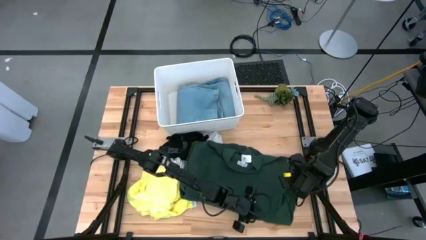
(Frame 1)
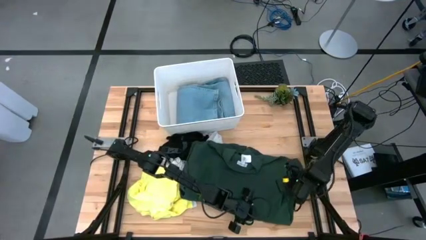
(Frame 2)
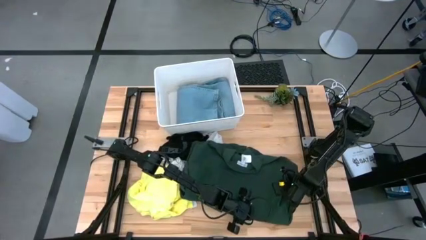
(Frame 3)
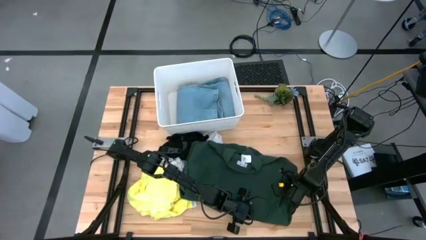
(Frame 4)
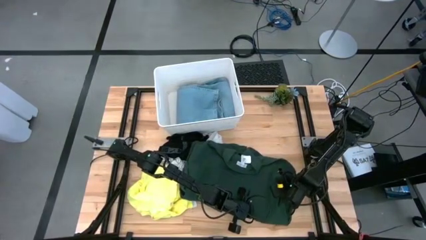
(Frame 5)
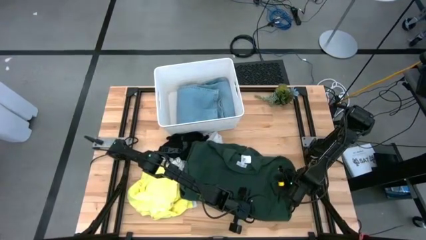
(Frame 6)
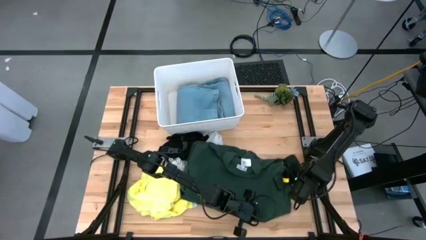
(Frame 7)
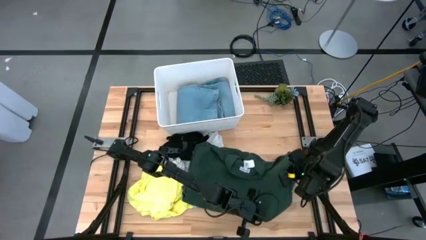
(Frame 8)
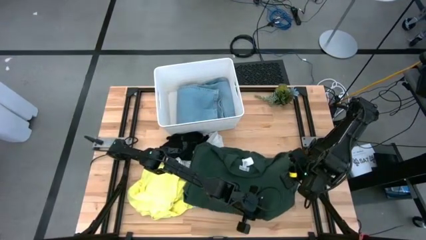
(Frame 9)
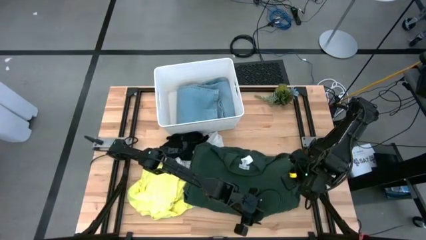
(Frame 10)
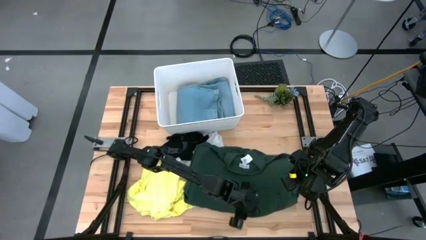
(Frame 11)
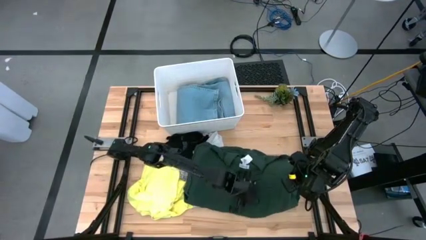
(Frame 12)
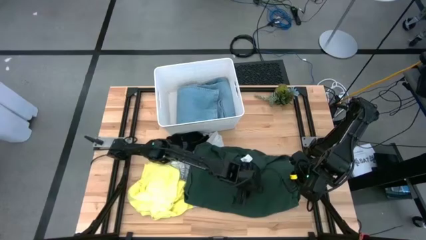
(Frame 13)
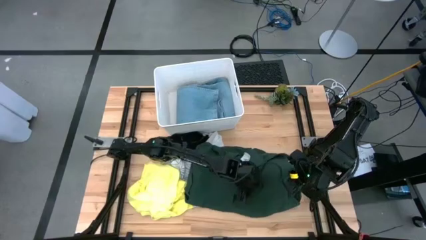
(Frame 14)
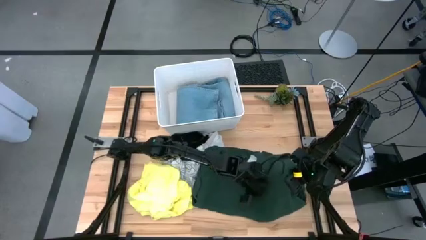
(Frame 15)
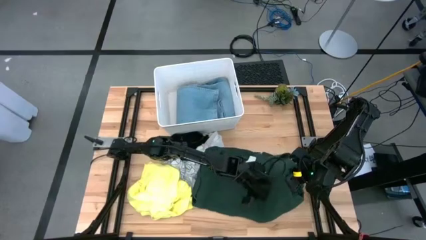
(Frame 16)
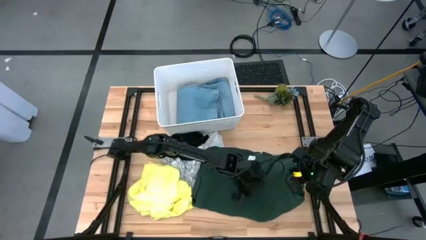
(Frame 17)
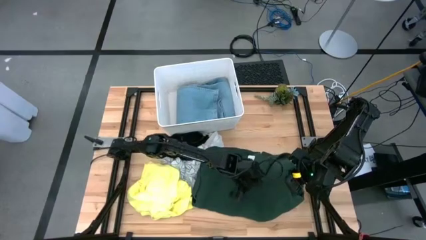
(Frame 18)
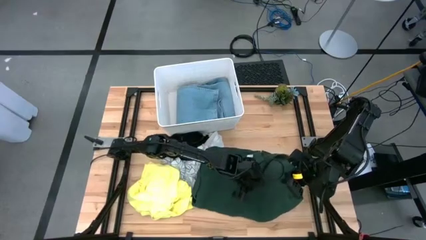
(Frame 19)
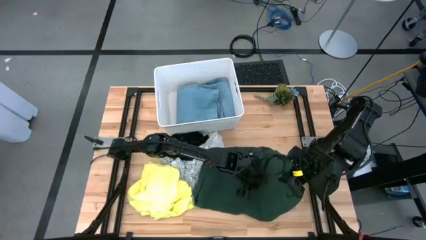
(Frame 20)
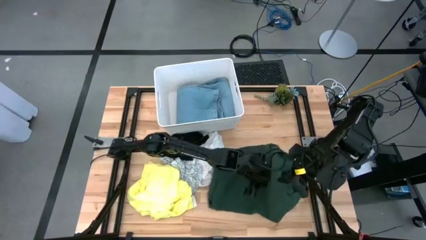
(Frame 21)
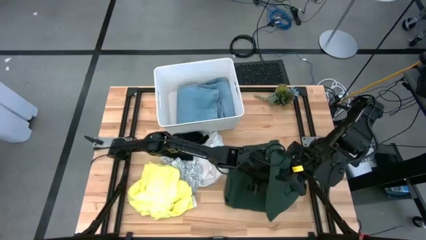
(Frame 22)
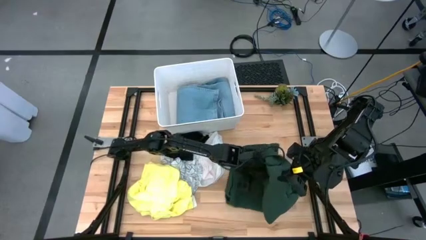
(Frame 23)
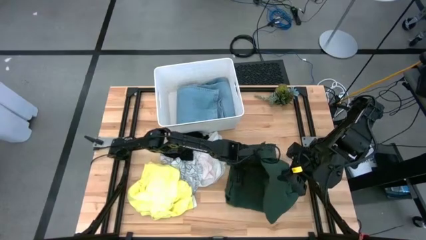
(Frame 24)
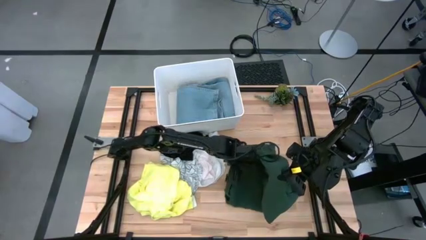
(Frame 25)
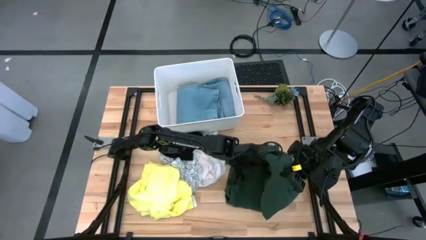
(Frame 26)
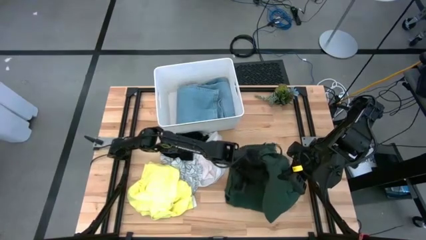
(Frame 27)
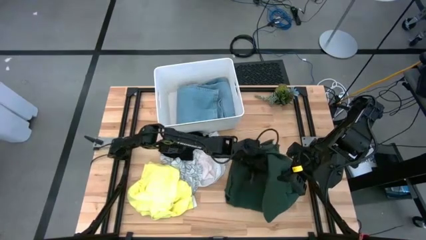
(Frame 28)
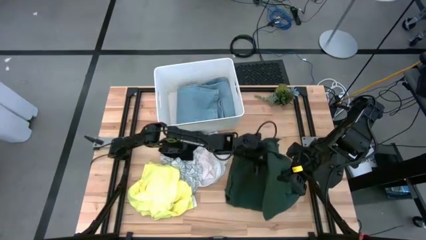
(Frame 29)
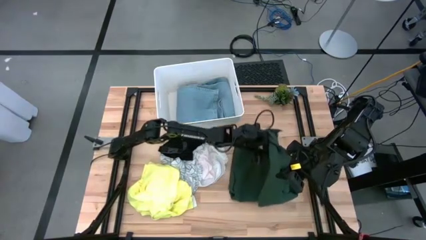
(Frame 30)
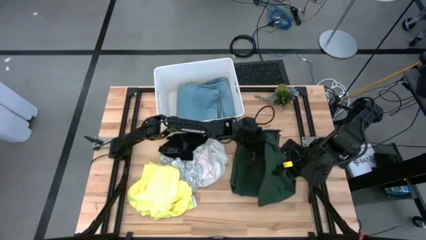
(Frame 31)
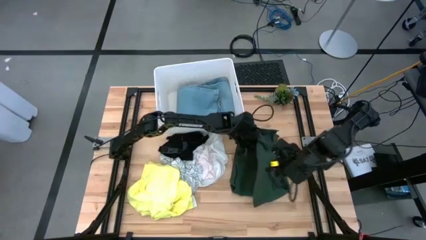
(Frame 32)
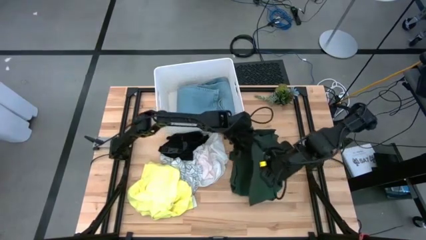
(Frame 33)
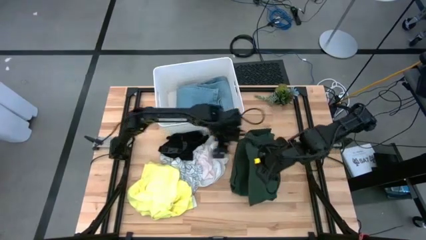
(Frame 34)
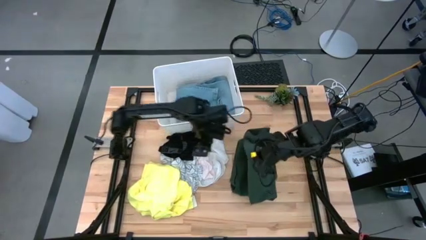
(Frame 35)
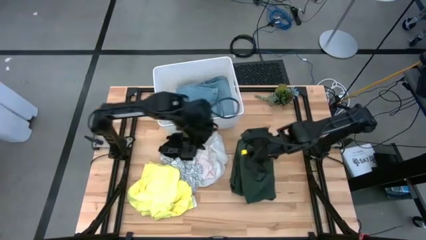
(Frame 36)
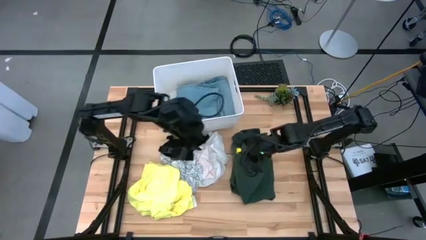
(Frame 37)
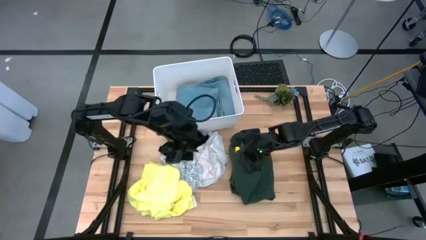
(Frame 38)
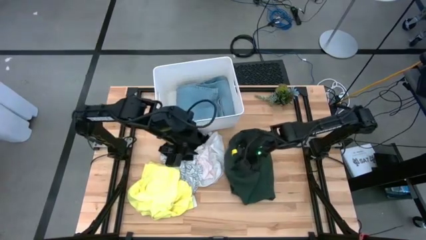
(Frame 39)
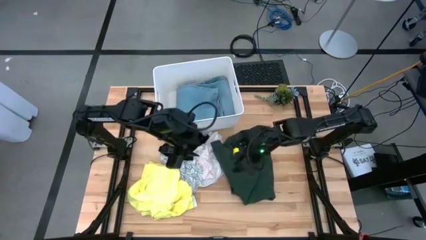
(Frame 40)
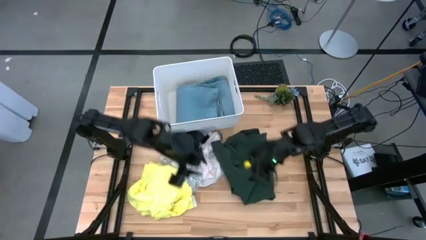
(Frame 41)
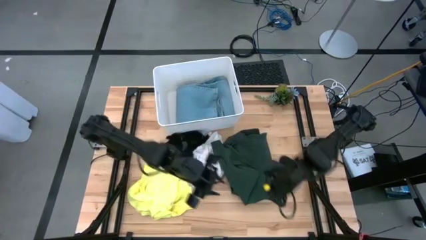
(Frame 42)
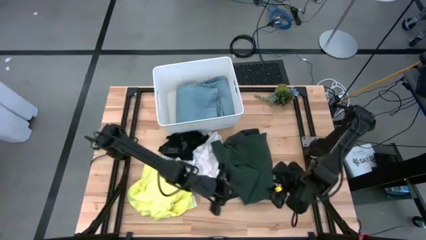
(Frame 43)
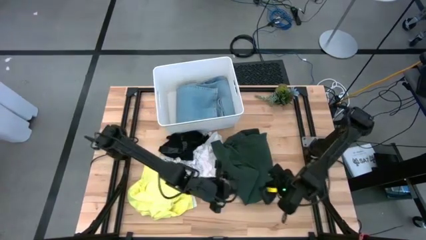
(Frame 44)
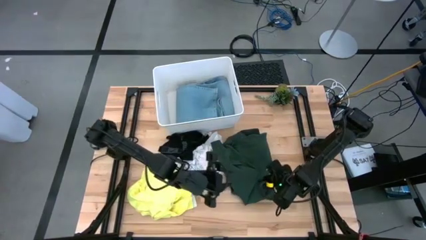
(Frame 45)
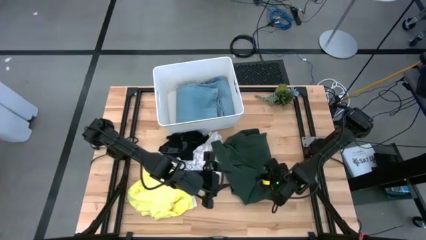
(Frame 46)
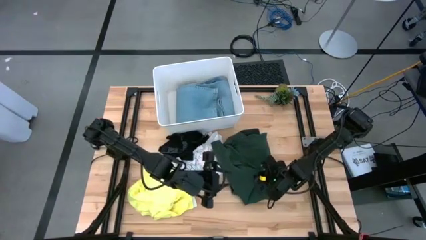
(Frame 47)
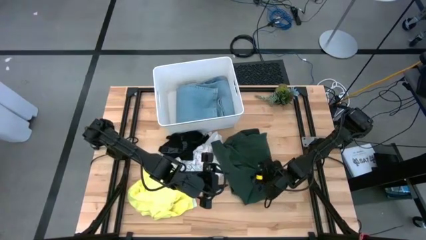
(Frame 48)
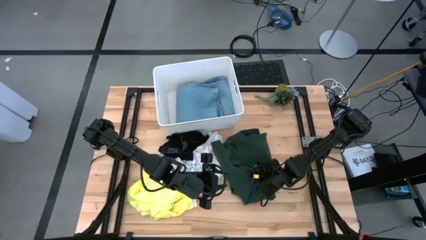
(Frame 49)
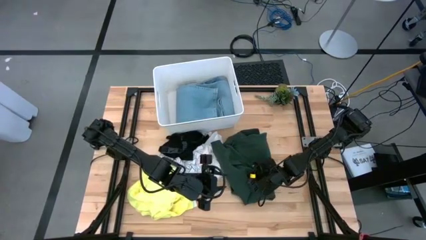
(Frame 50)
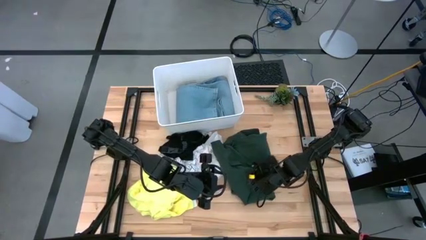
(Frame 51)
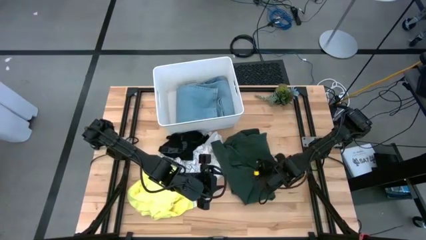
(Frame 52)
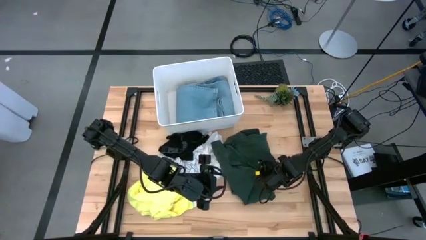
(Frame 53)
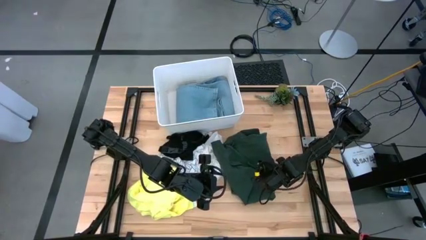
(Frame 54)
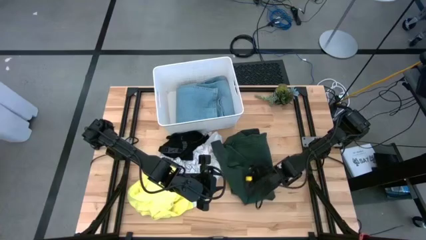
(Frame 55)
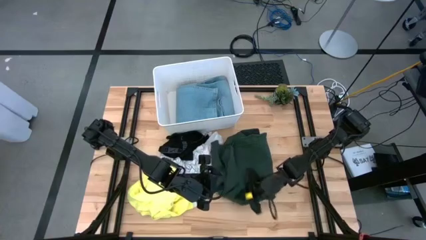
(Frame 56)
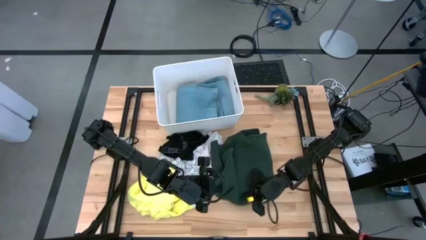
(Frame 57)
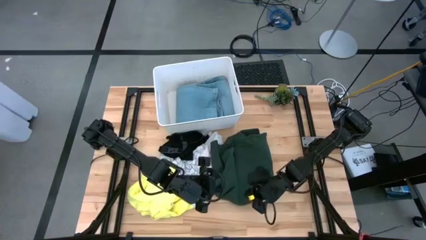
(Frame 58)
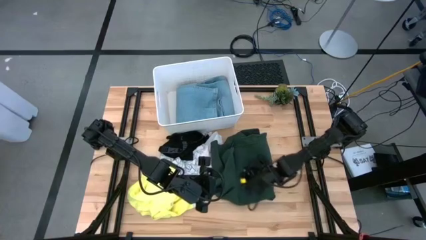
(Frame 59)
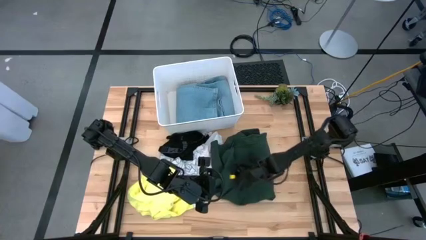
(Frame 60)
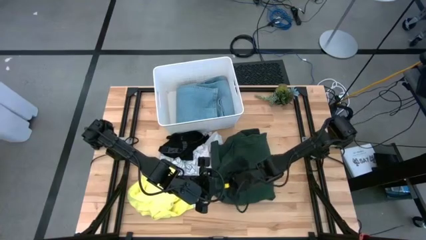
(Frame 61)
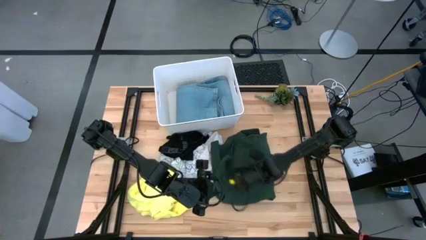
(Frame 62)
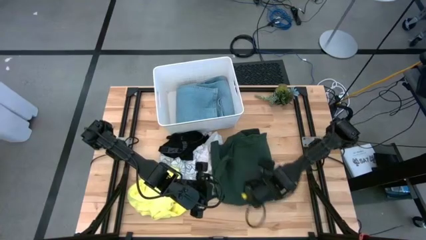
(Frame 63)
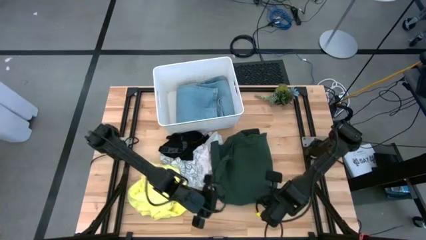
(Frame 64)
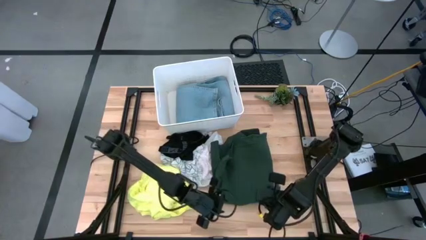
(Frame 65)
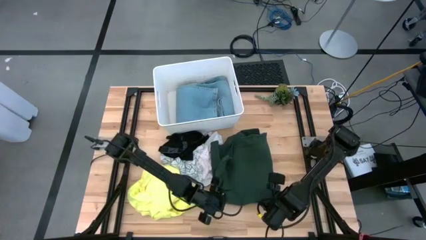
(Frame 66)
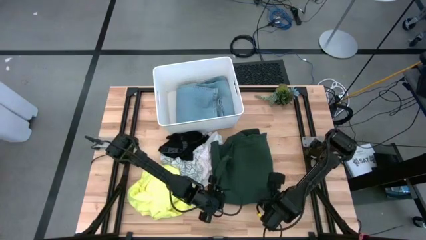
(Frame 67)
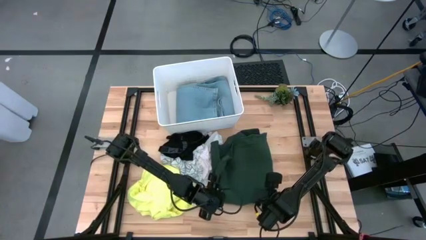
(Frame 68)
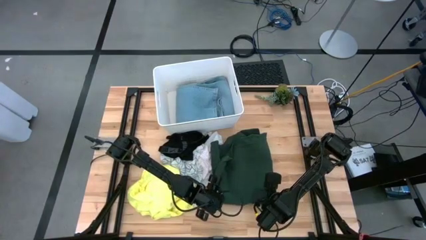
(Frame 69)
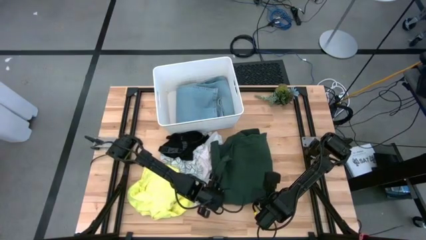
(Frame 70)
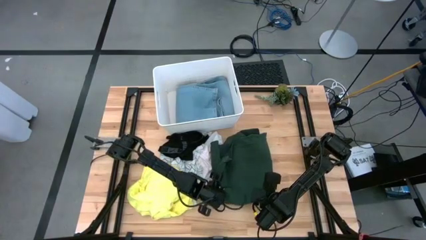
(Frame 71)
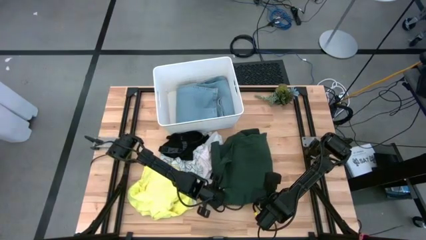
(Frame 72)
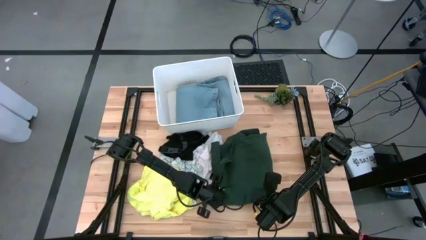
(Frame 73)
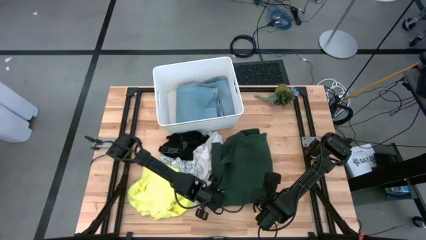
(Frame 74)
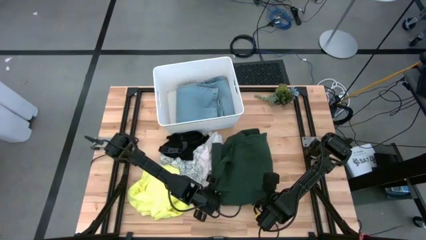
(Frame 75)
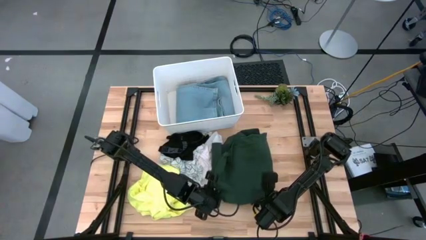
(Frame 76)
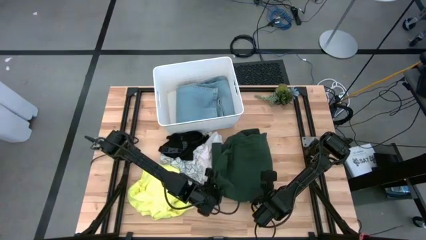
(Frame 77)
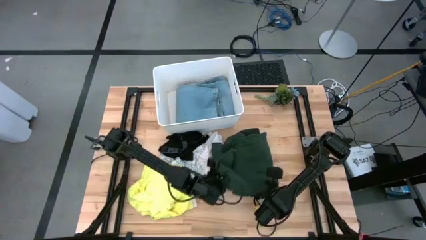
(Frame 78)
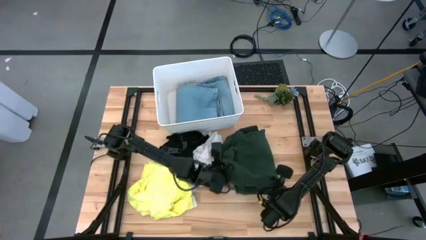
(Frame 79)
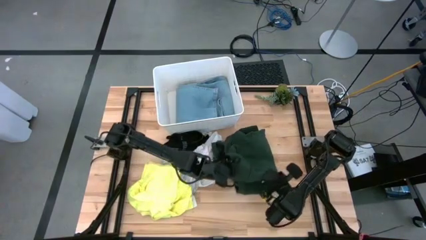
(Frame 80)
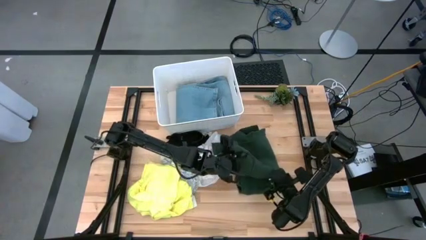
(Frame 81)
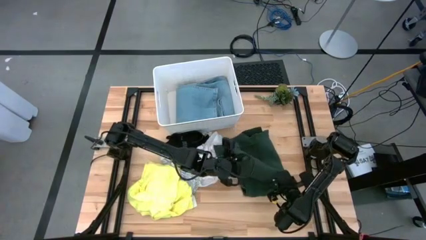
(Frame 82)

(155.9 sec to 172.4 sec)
Task: Fold laundry
Fold the green polo shirt
